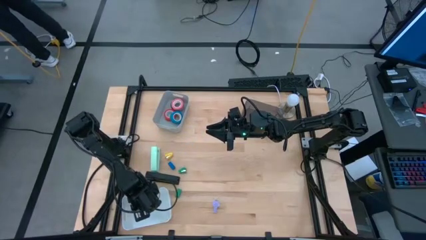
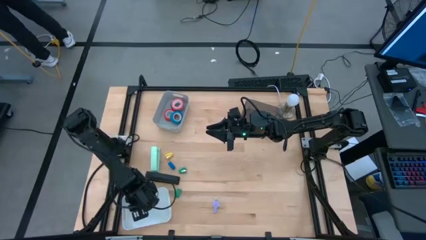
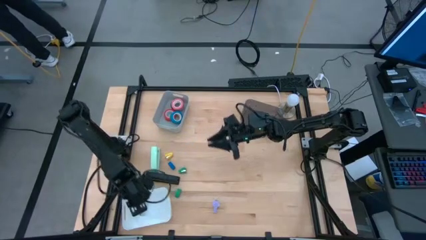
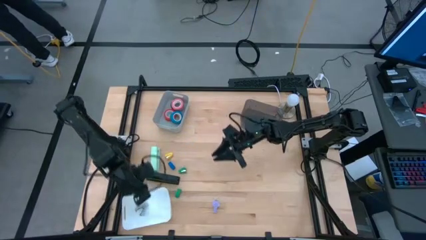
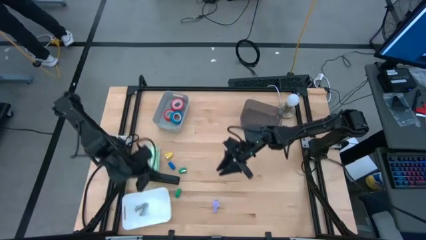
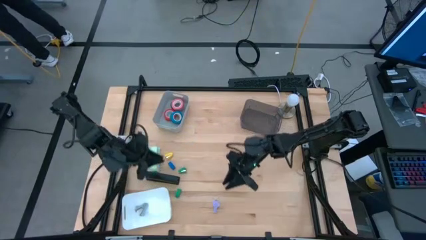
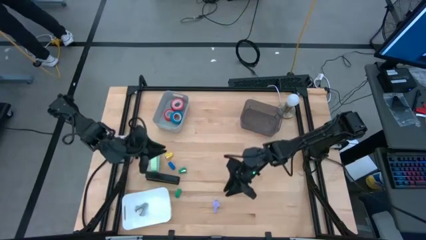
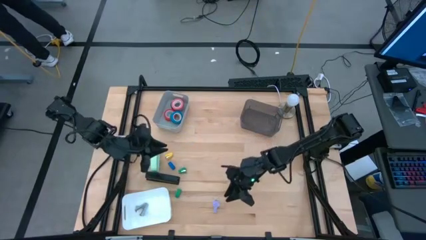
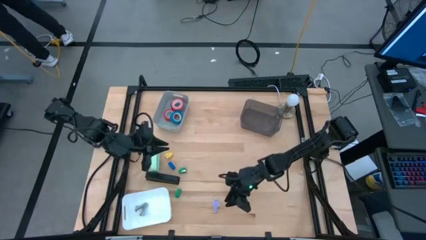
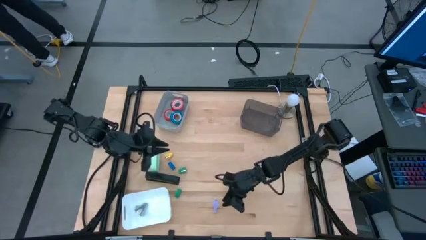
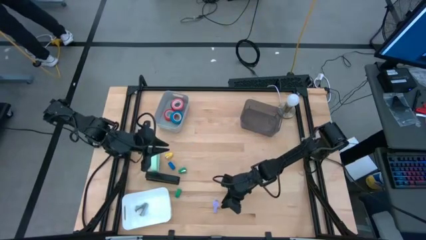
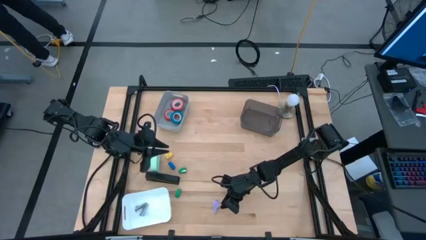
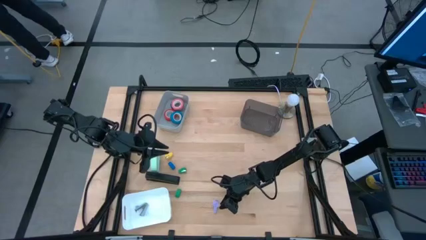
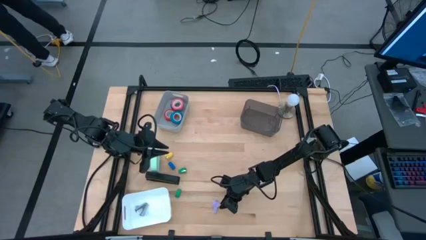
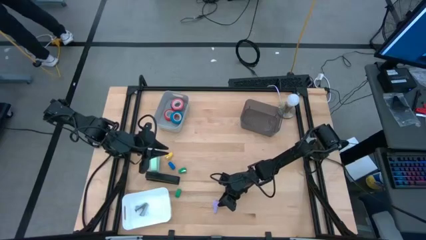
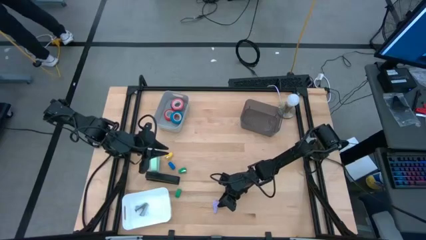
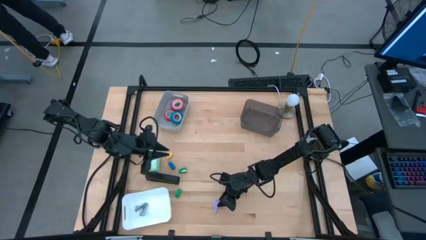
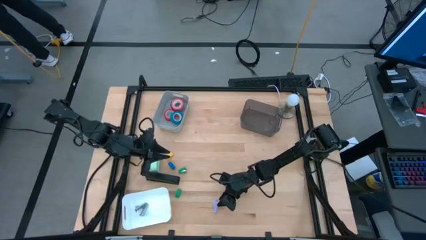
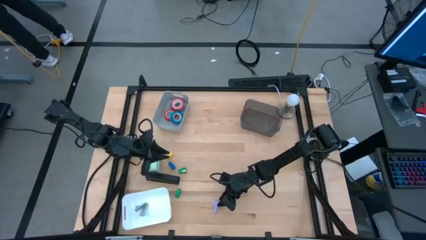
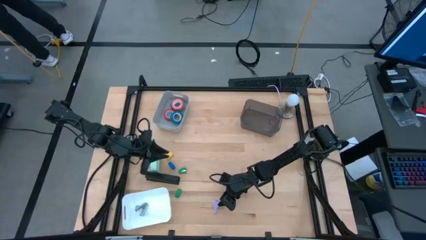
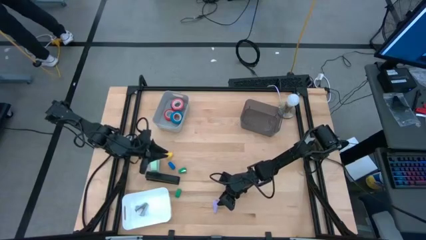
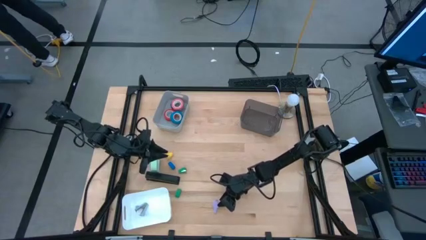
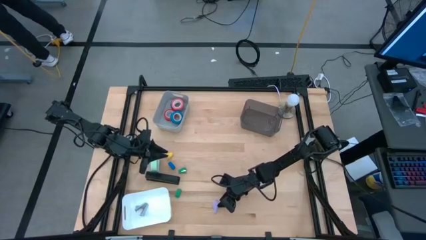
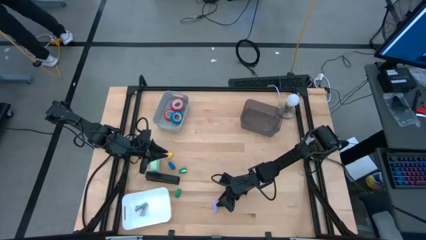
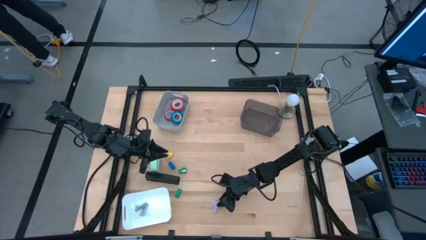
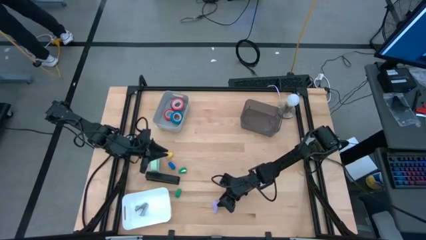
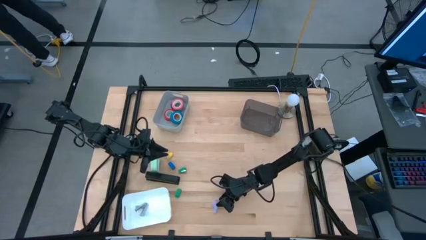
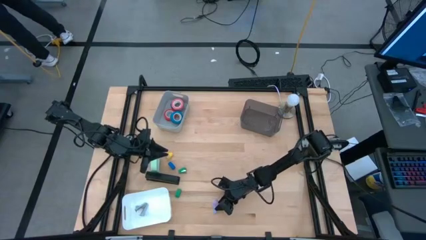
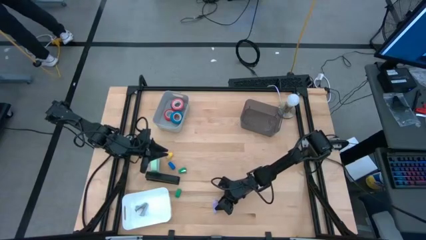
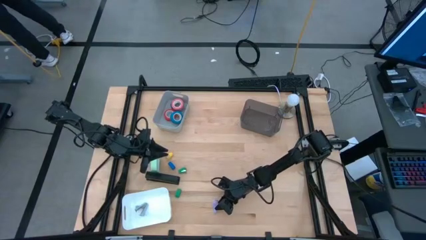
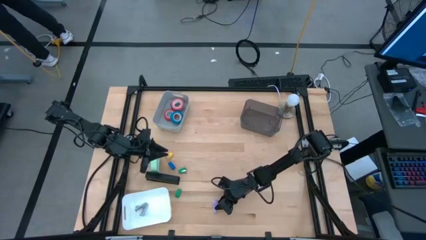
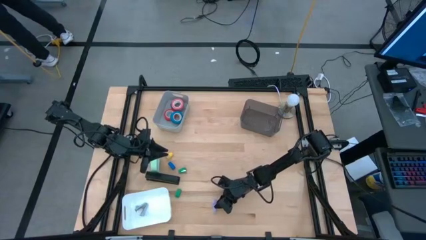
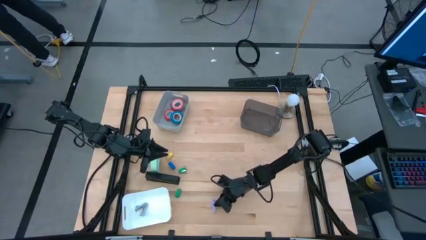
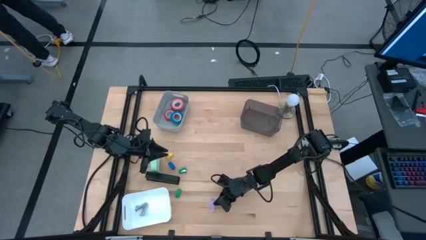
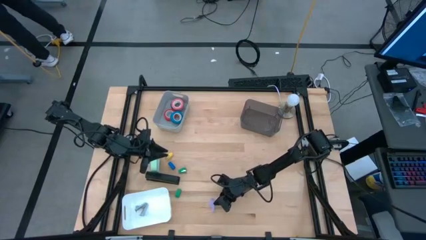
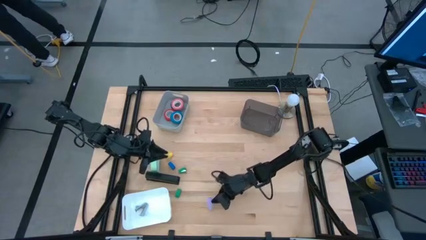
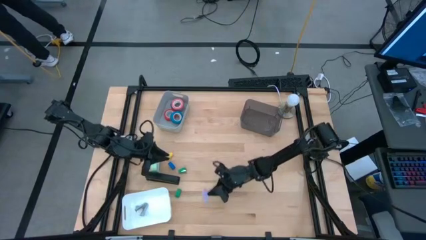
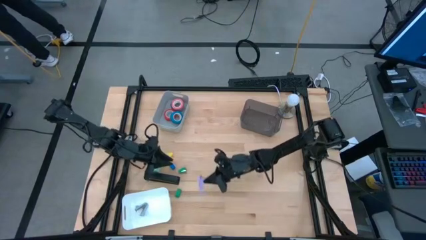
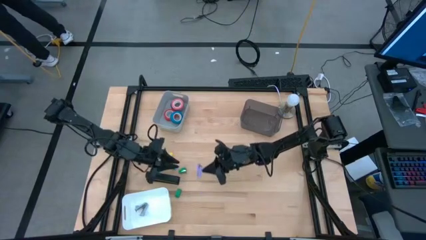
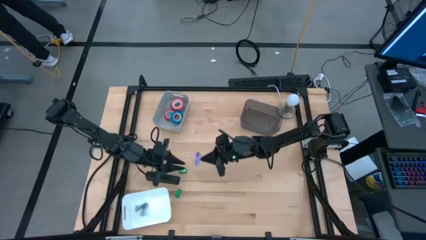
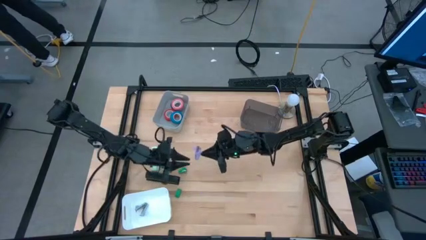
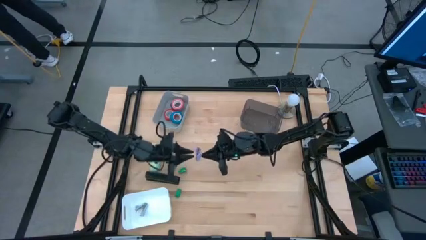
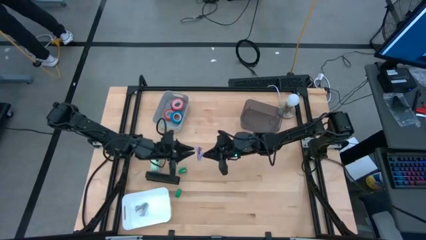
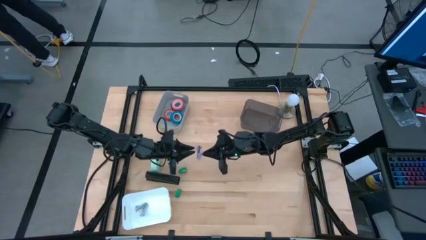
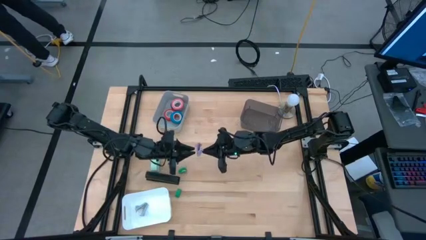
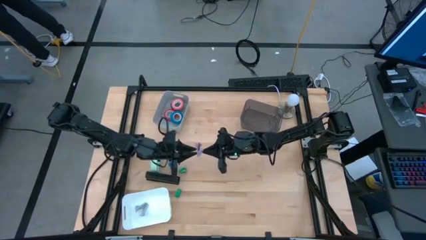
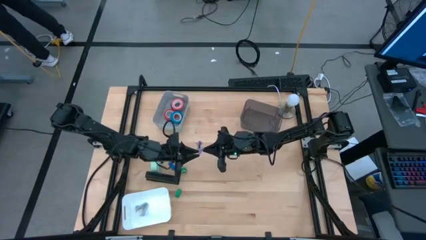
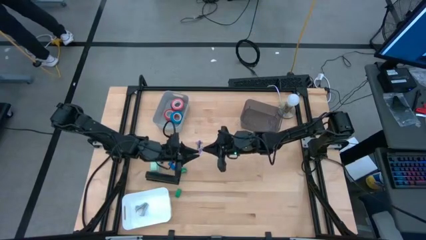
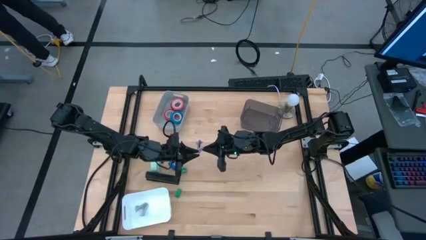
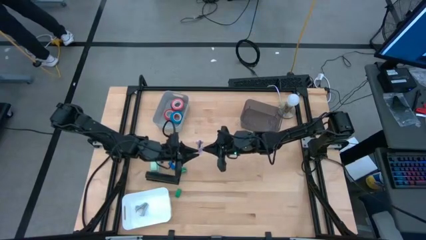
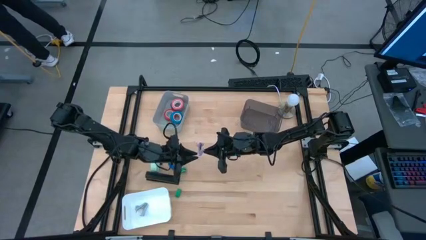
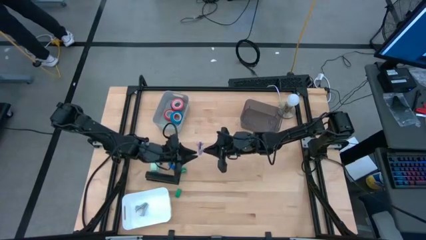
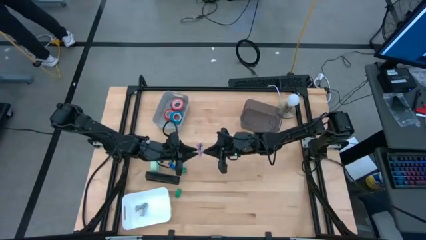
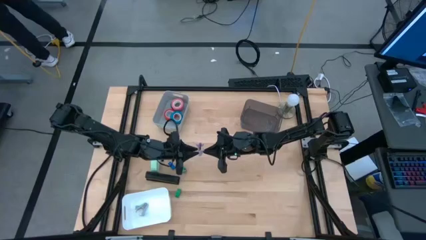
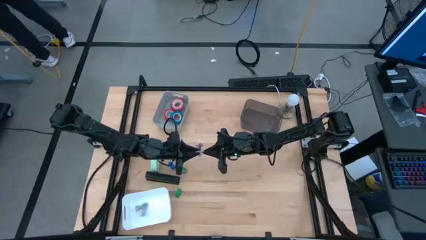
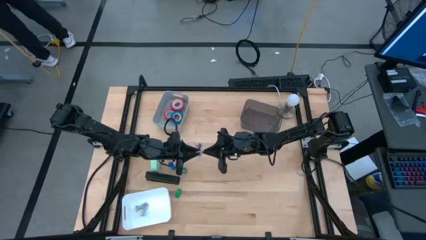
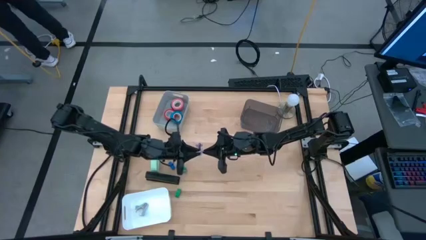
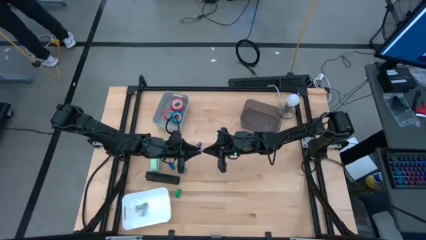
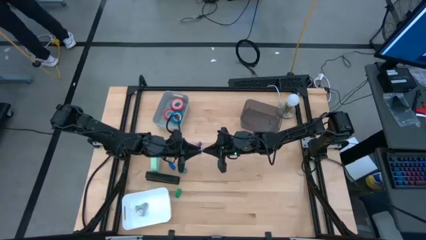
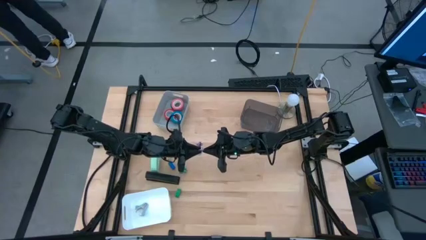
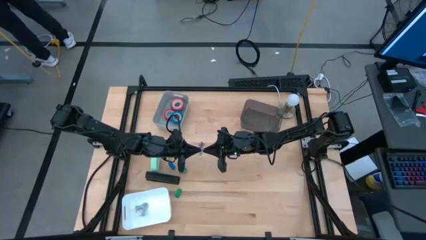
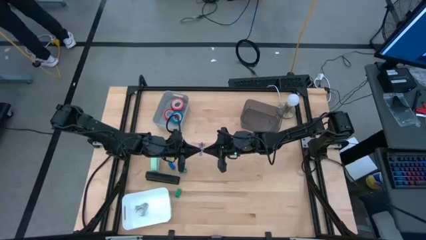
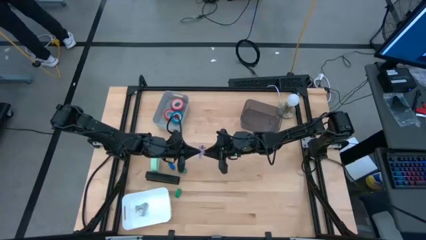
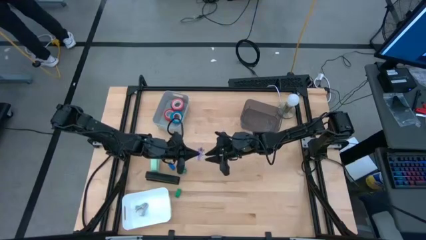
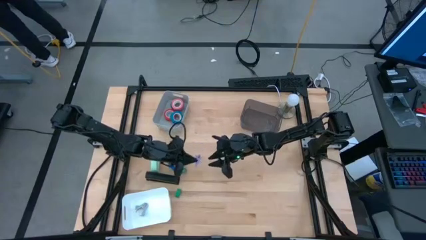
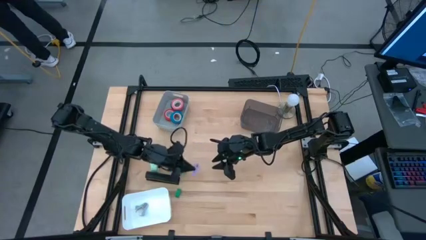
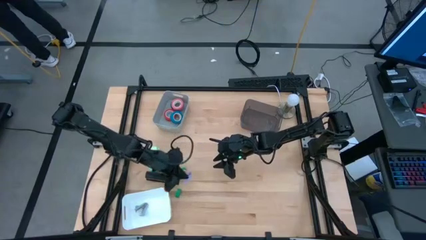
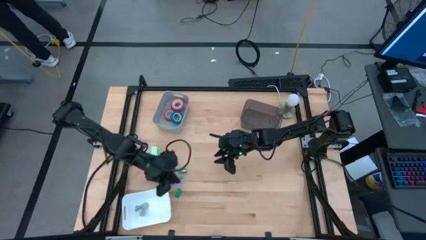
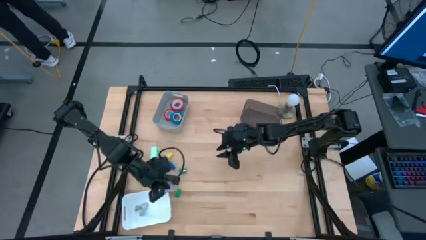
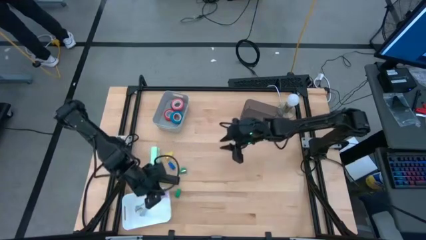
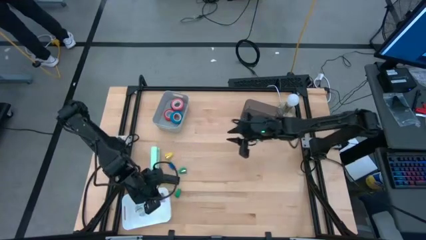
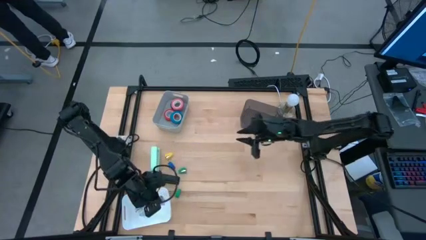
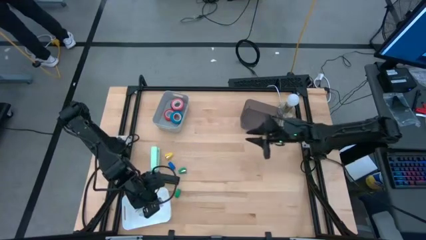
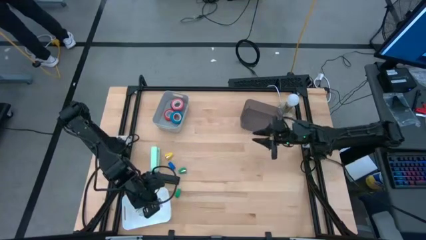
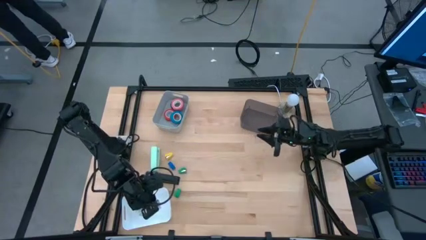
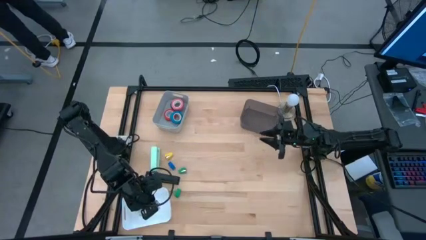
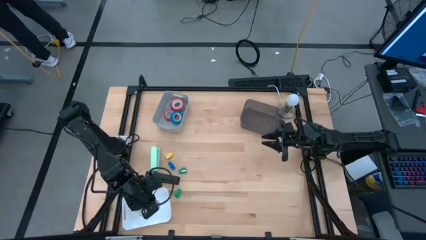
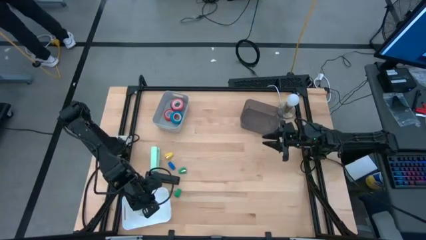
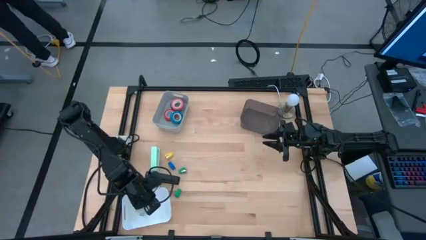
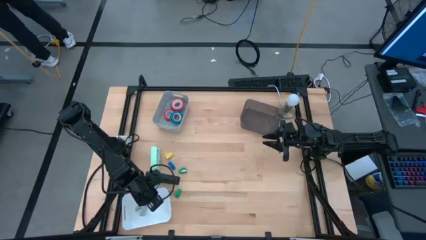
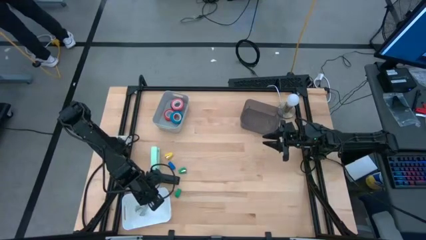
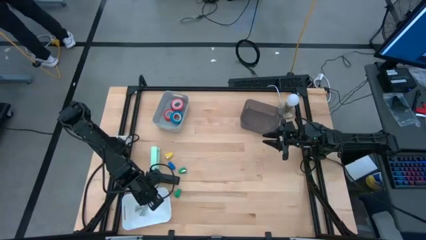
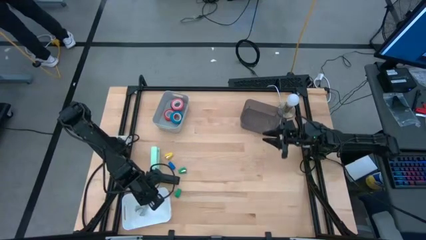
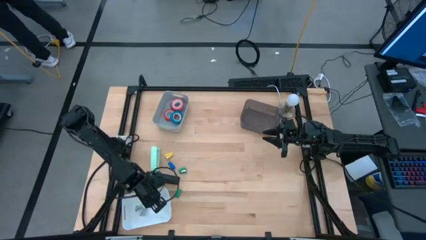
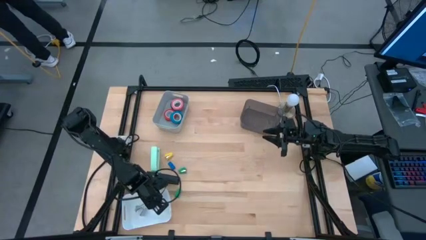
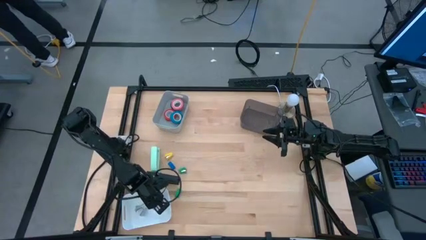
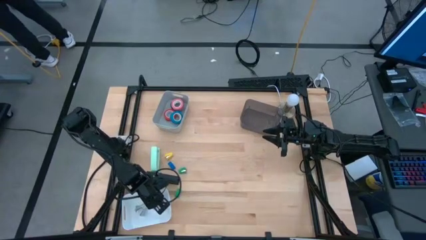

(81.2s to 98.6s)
Task: Pick and place Stapler, Stapler remover, tape
Put the purple staple remover into the white bin
